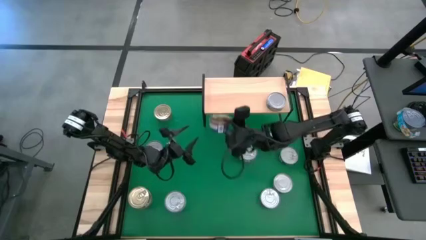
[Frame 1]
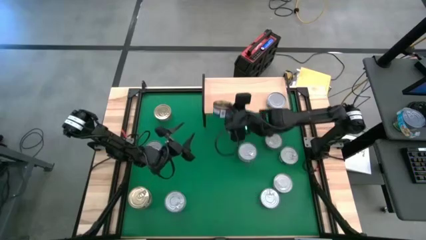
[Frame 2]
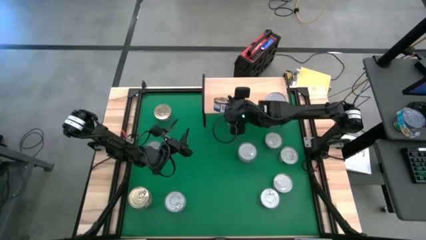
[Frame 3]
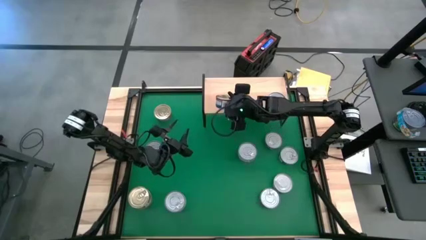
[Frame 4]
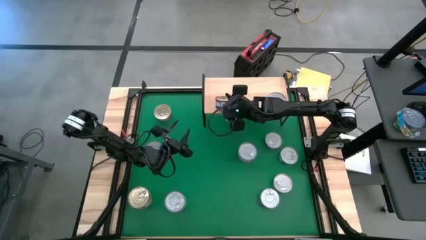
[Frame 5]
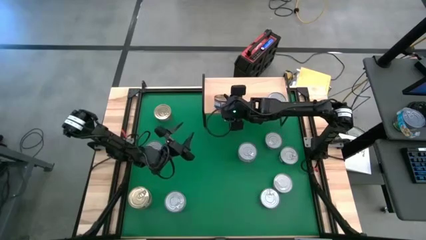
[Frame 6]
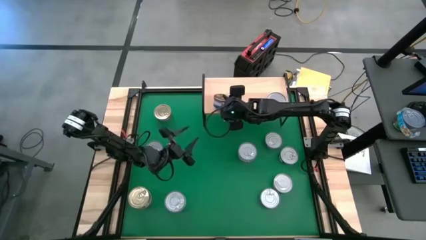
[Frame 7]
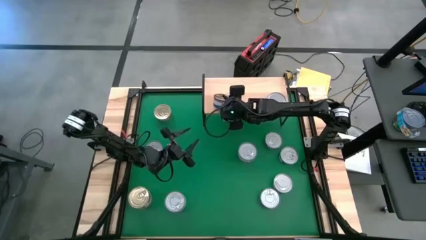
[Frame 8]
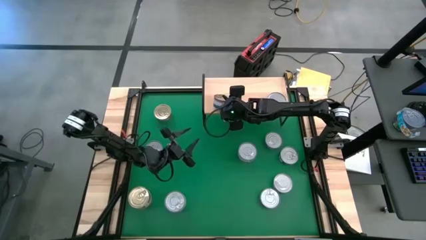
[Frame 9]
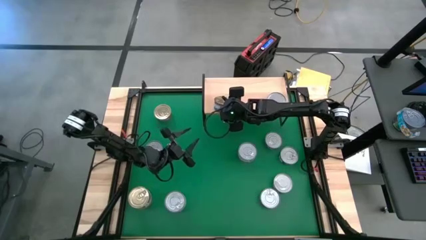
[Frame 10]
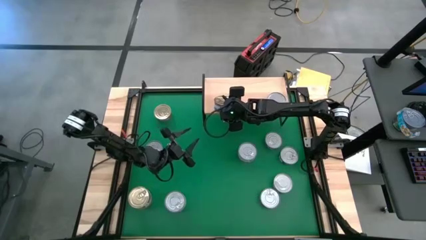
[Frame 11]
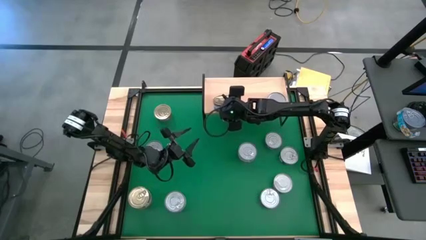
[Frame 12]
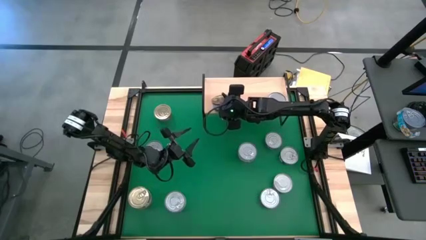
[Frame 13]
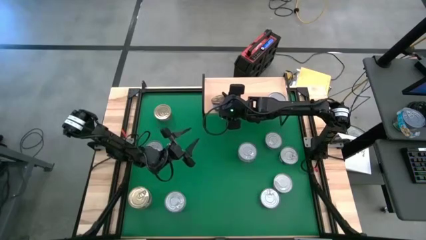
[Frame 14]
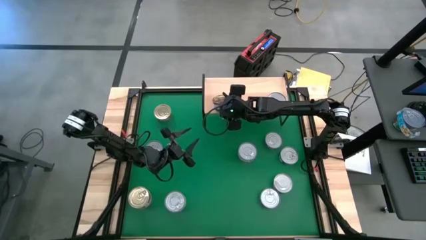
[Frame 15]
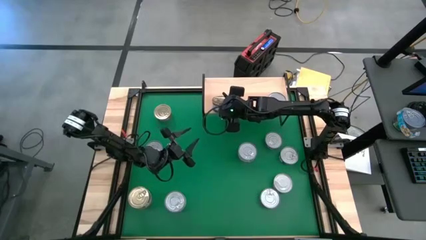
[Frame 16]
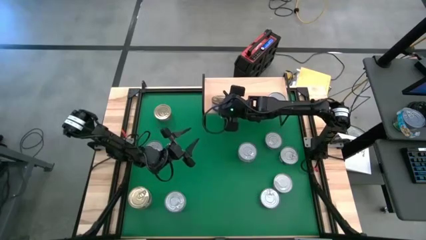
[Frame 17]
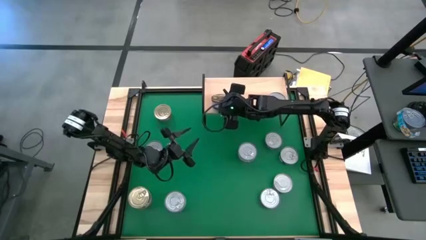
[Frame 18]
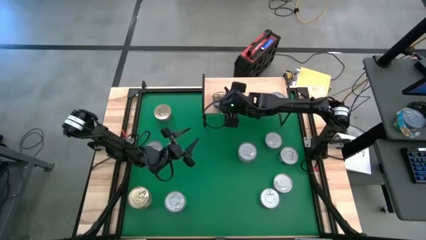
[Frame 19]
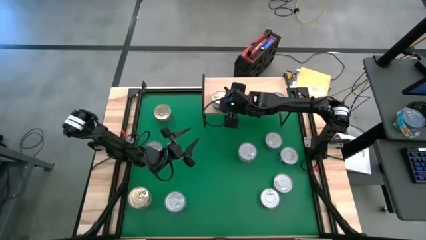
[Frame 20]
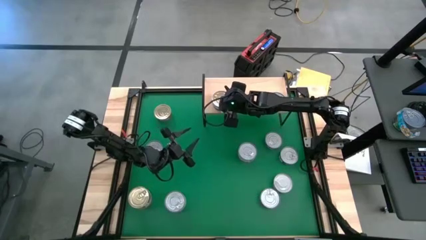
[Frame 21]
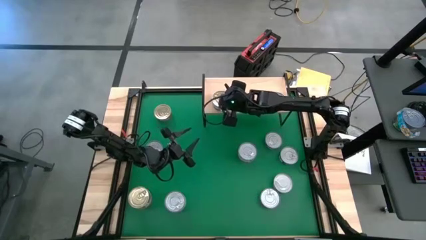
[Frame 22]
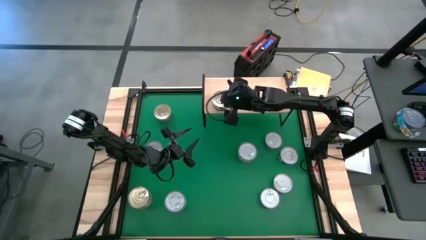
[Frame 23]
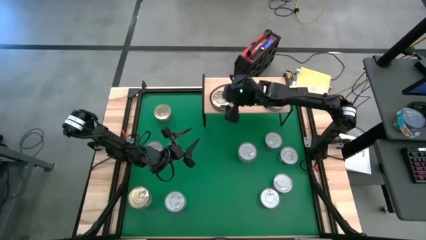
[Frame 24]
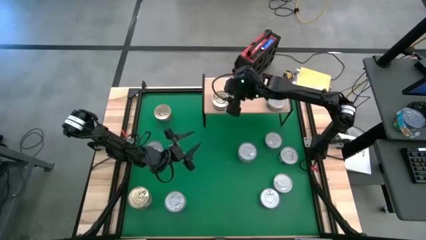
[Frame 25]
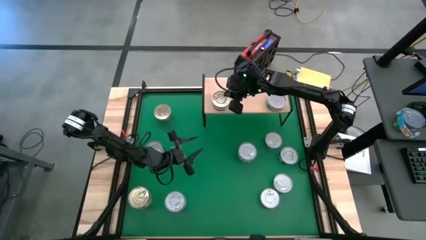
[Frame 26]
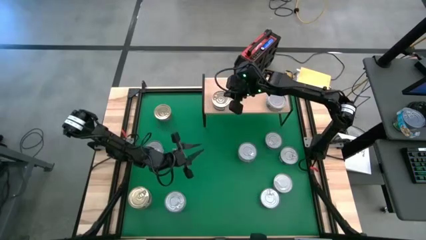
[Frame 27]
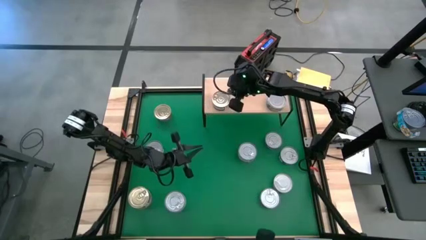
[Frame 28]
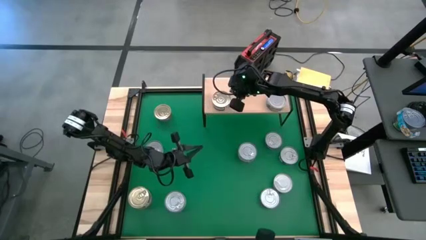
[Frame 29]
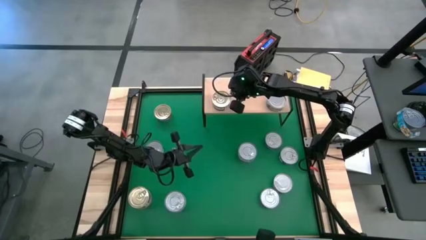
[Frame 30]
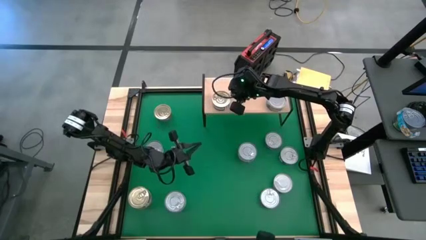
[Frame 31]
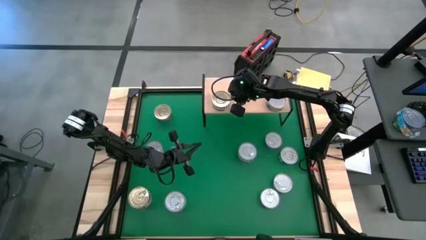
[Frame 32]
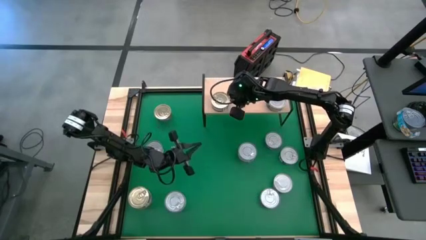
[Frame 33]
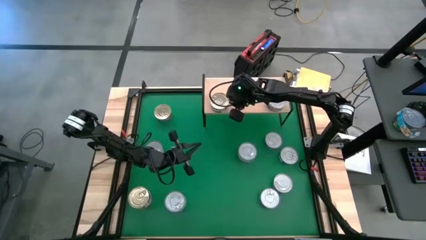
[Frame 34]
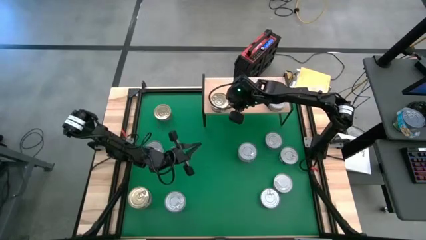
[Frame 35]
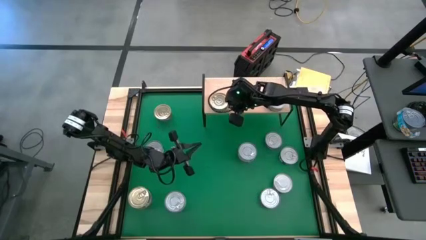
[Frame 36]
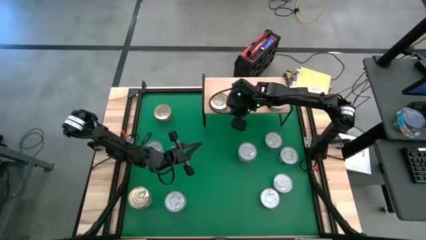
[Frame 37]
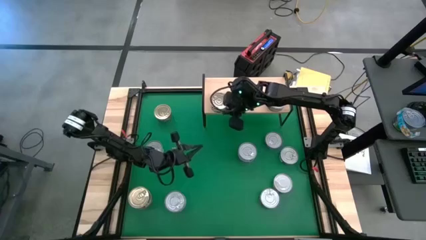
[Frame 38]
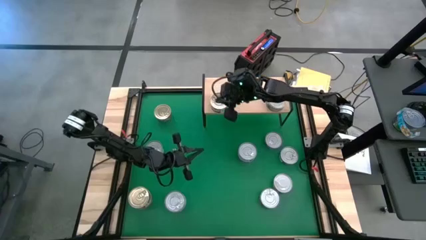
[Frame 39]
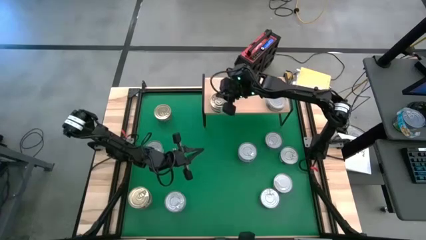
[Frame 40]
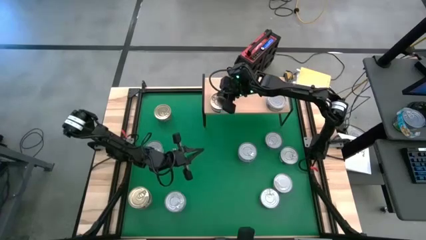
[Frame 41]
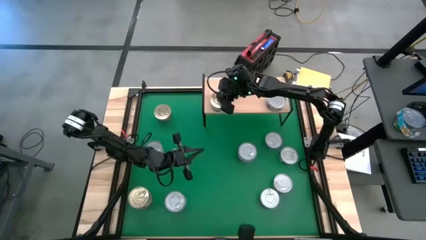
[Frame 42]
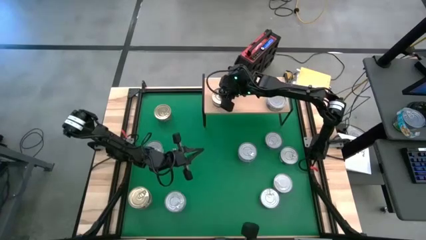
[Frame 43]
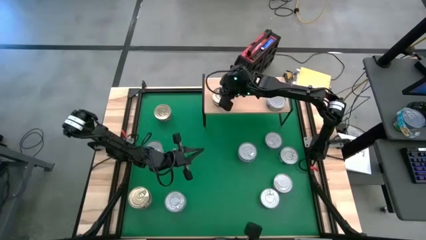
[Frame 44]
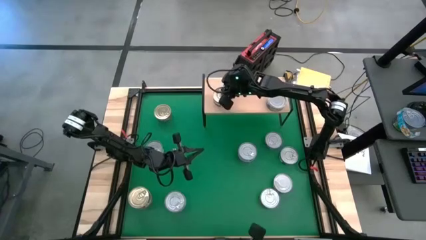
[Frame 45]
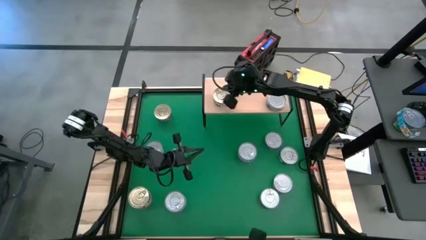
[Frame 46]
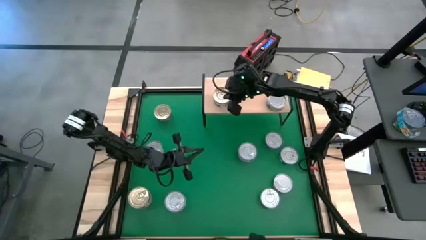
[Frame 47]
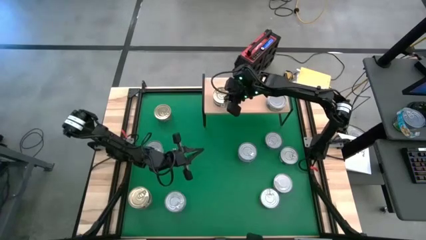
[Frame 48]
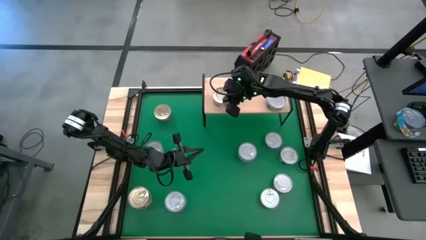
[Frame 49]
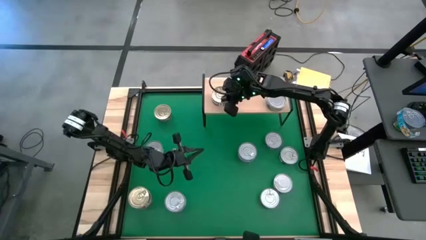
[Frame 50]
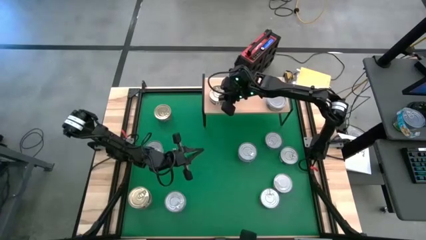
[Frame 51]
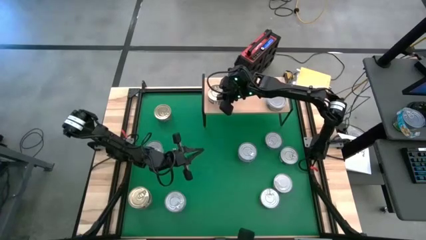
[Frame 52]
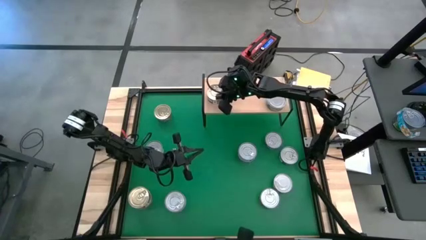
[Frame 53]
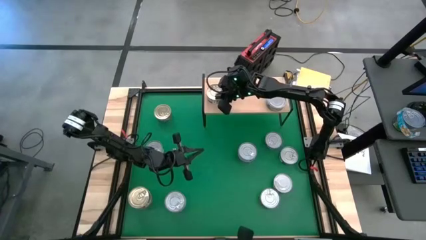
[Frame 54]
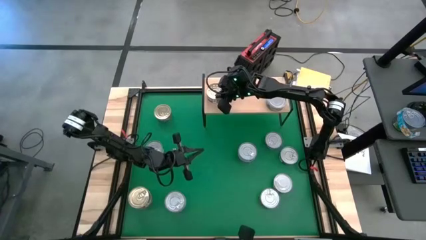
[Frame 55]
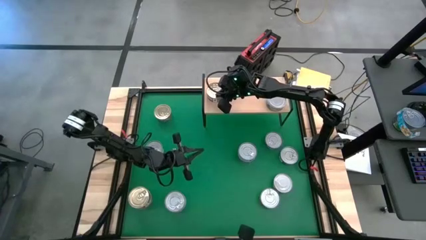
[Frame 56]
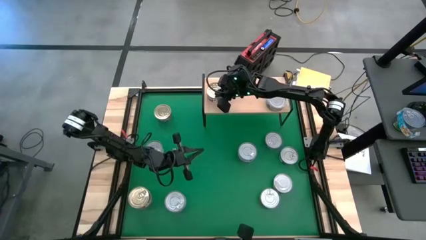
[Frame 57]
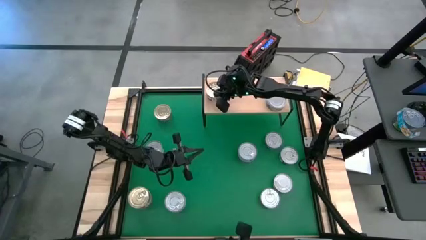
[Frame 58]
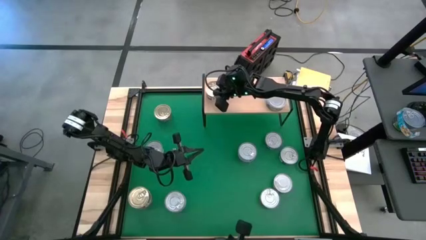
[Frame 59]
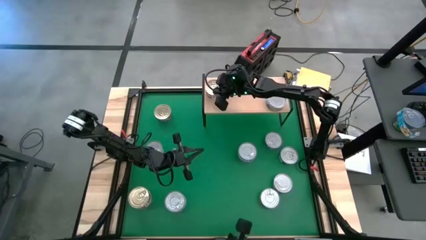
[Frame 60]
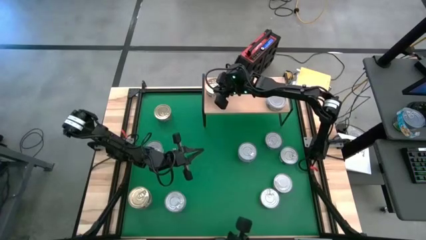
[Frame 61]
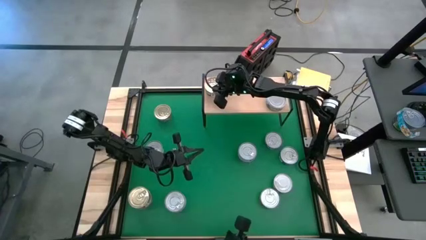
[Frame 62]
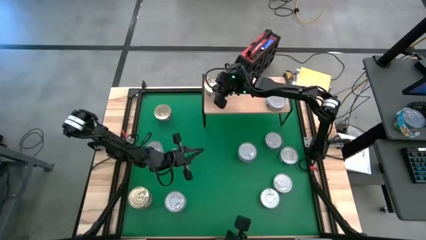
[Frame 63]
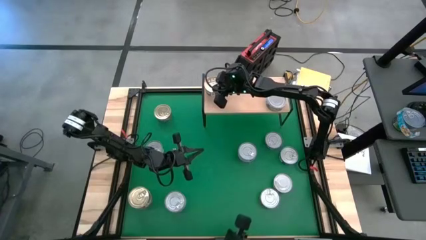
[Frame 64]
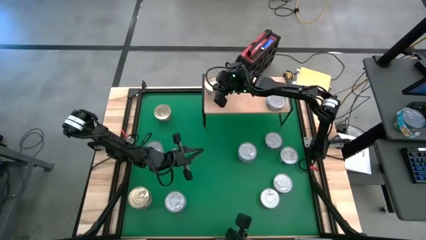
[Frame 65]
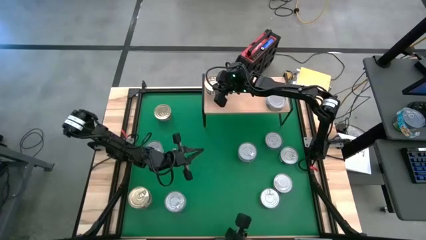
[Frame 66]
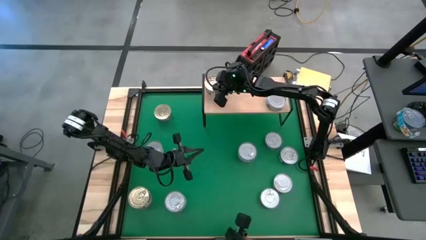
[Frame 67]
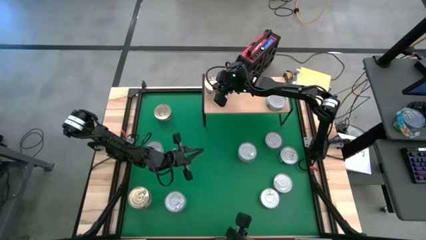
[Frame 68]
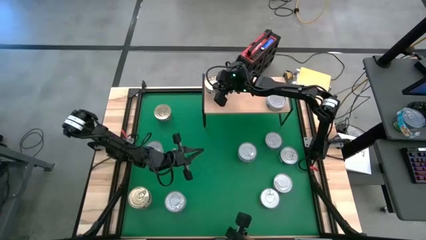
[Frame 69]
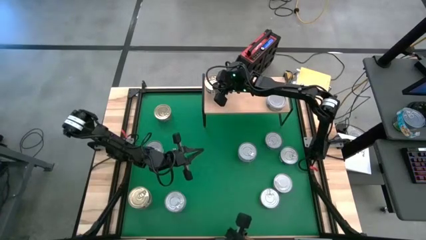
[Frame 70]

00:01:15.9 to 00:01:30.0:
Task: Stack canned seafood by type on shelf
Put the blue/pink tuna can on the shelf
